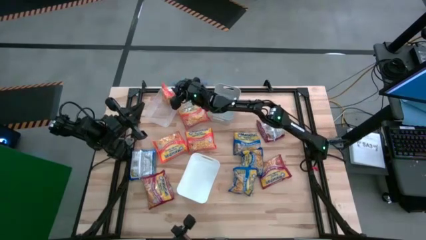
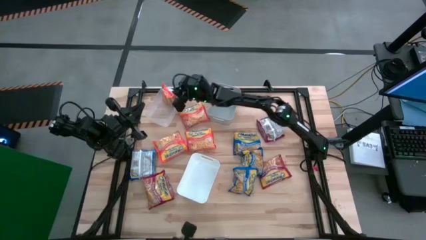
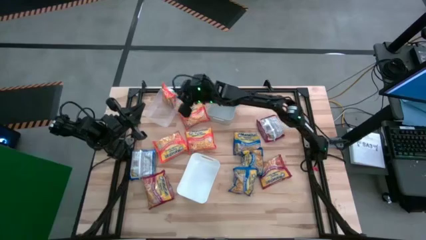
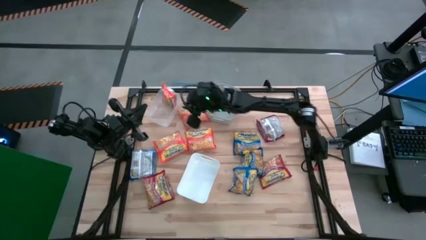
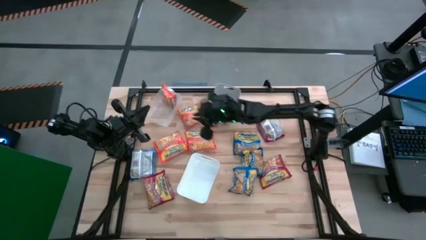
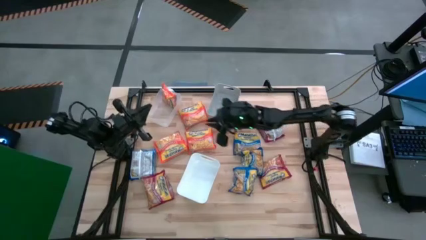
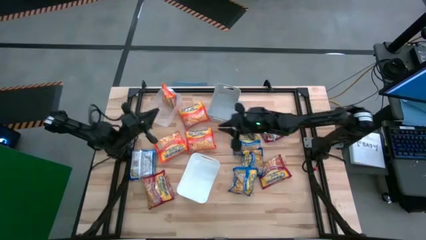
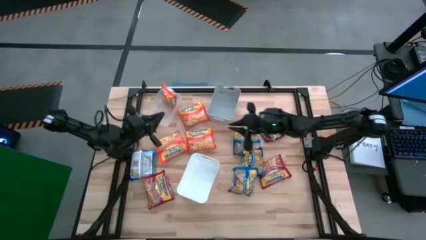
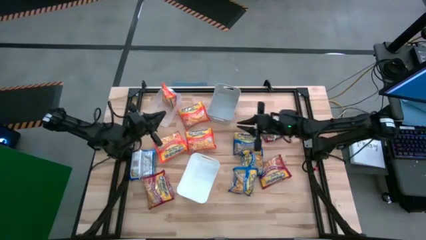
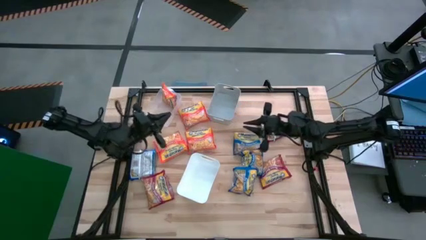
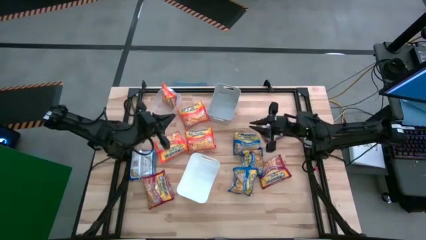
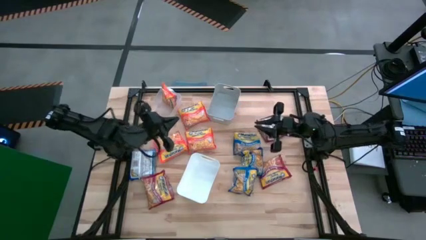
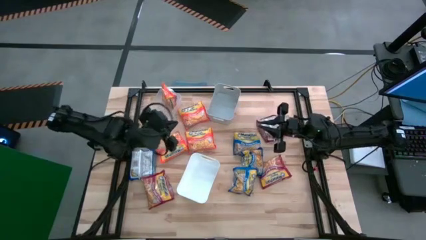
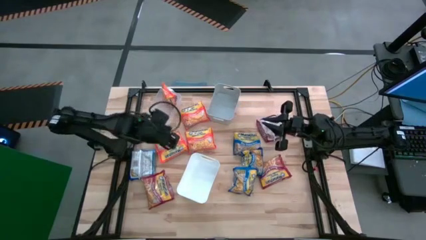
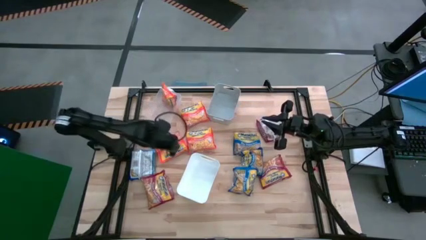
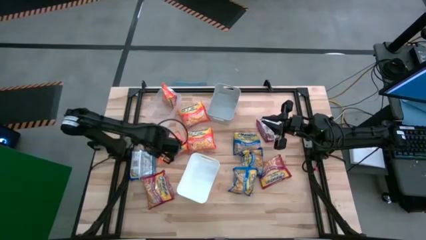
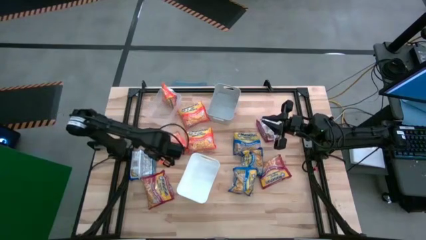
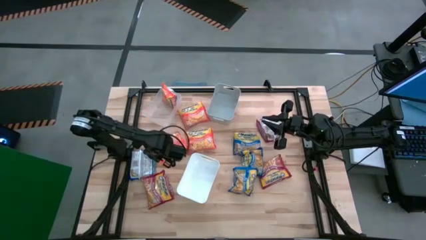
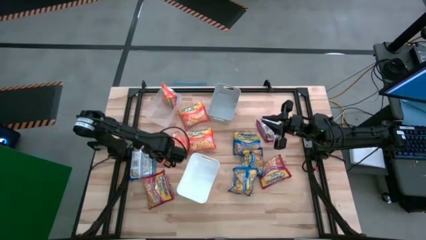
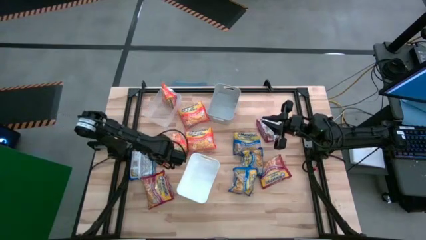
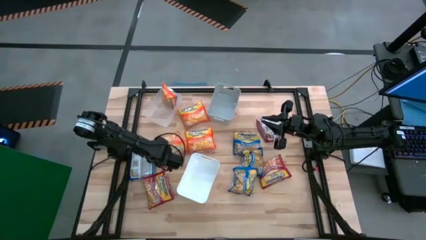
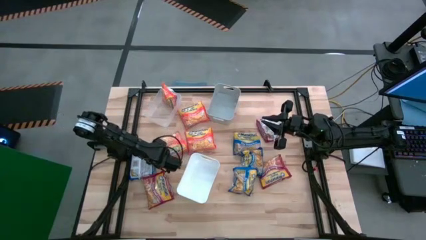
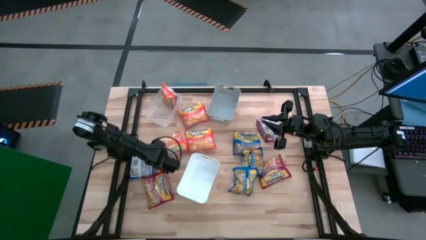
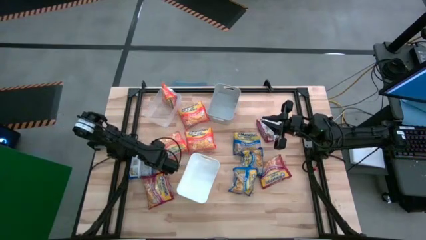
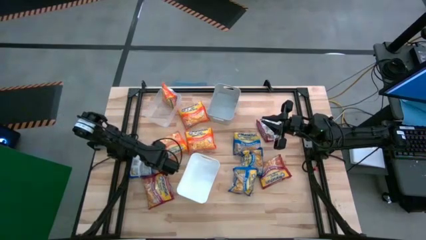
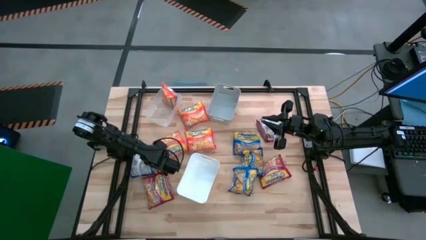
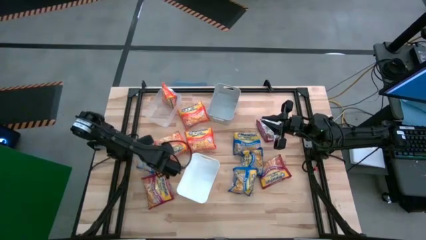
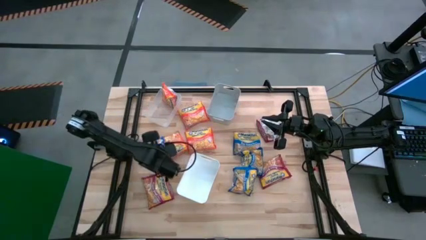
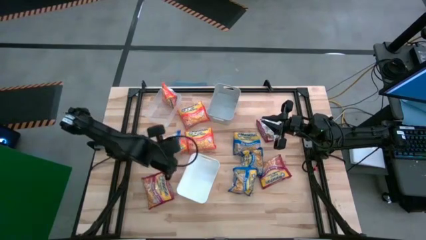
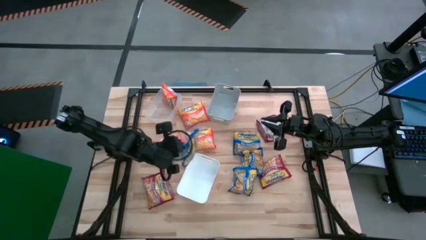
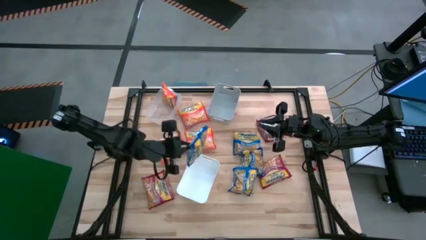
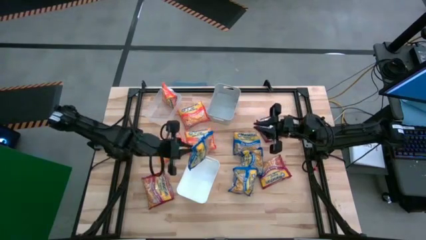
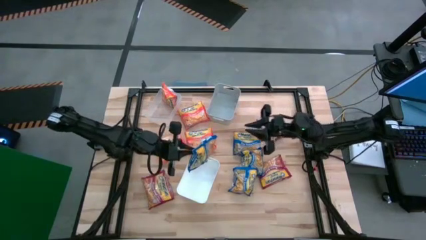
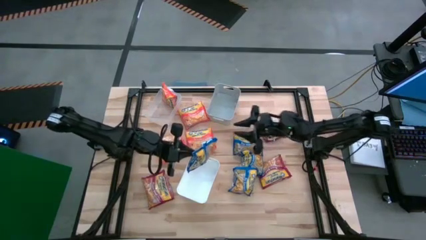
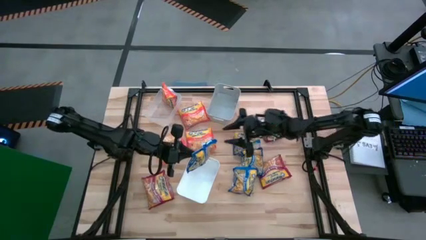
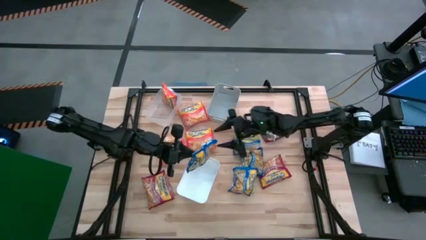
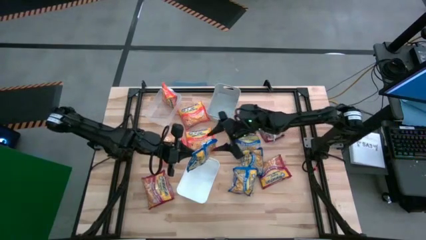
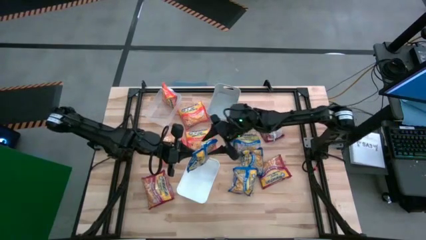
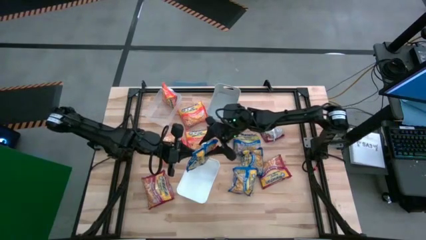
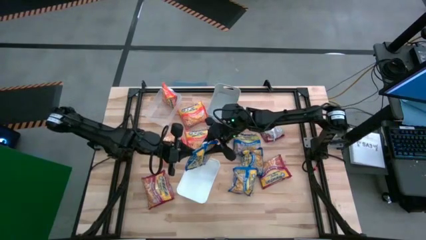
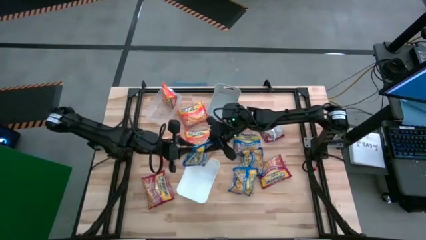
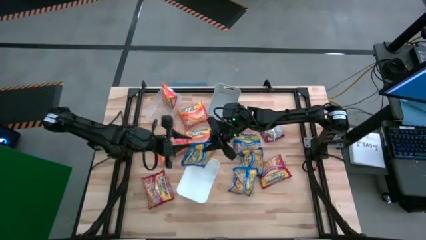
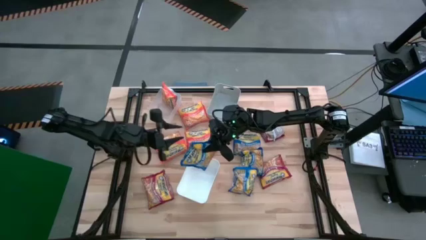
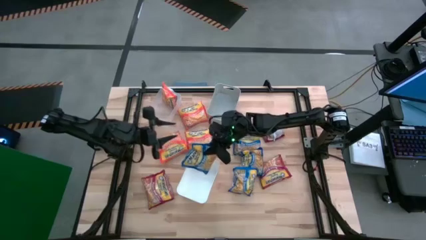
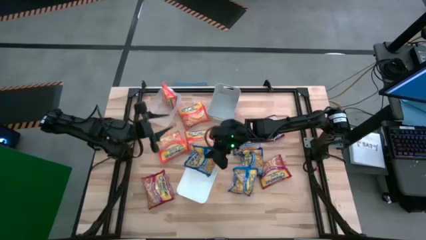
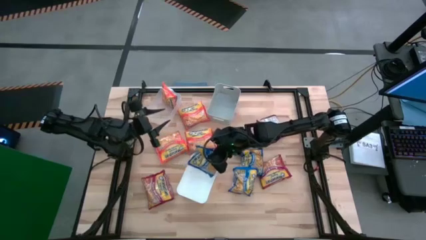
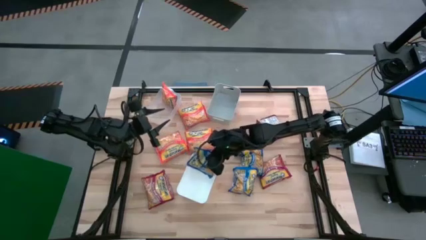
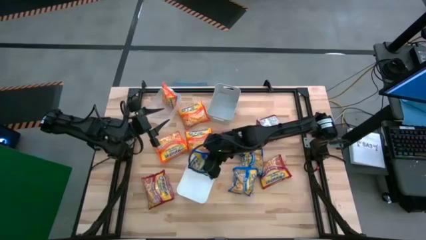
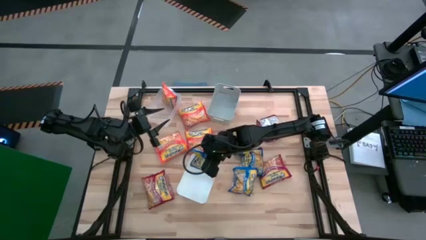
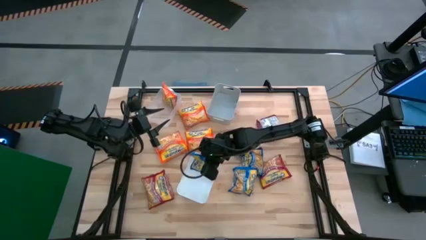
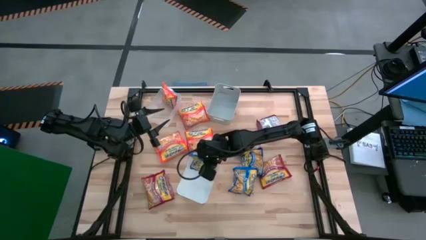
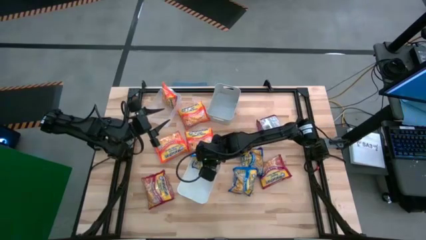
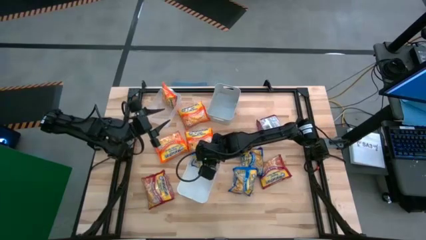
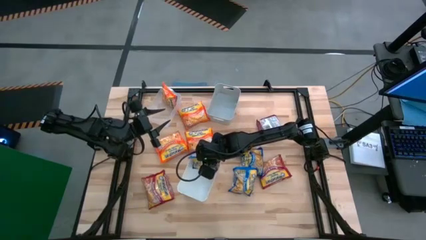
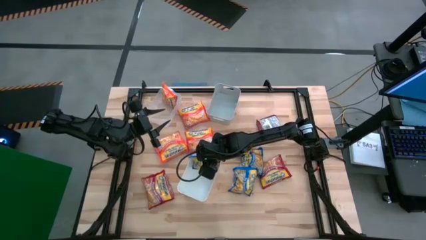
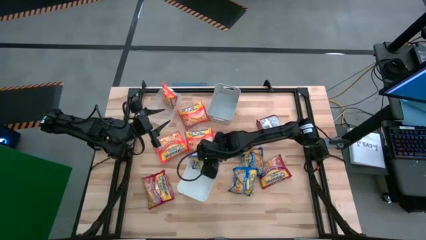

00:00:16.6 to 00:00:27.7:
Task: Sort Maruchan noodles
Put the blue noodle pack into the white bin

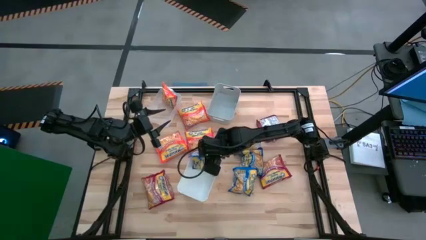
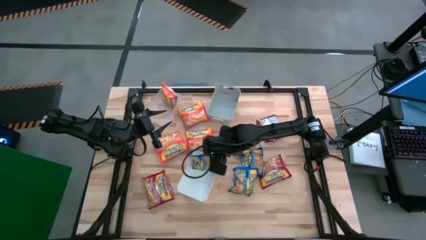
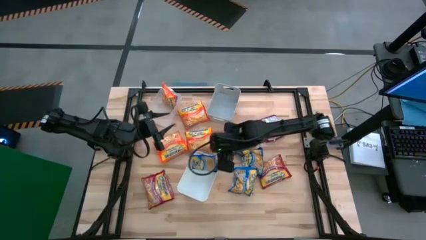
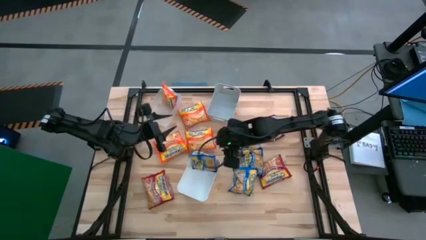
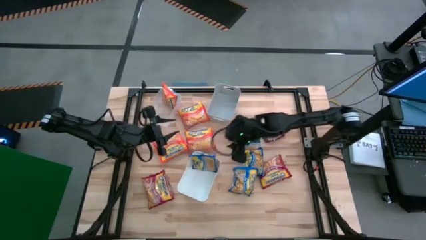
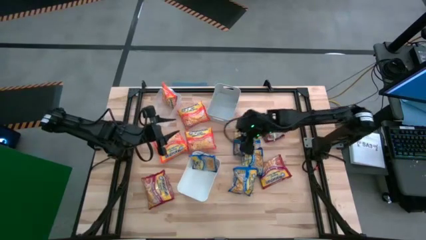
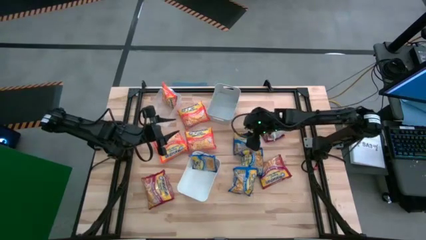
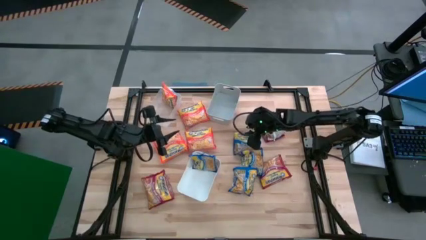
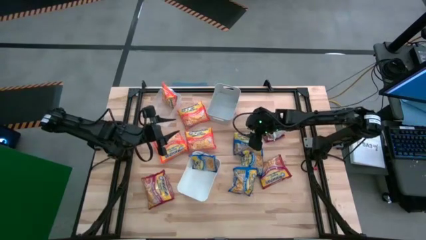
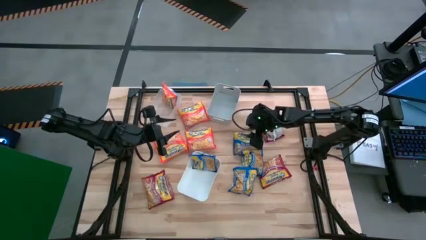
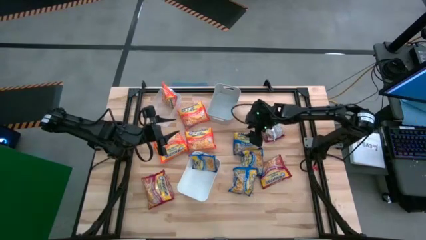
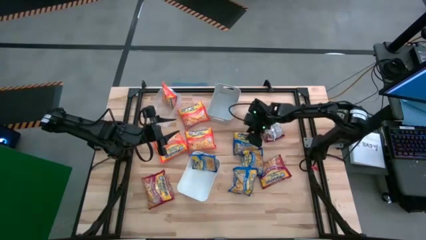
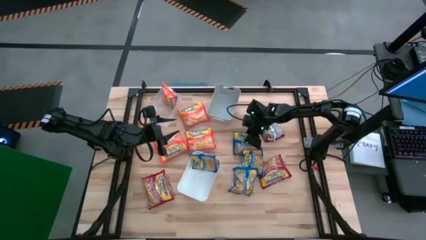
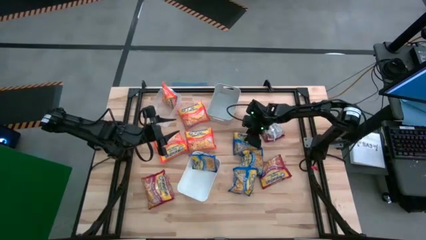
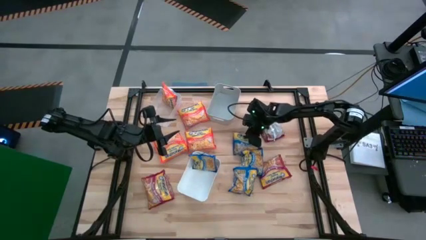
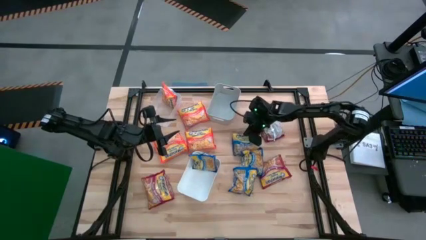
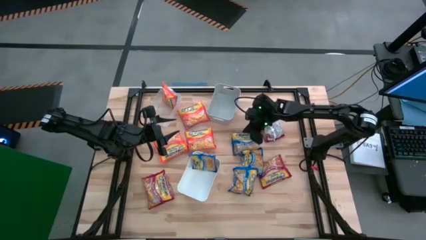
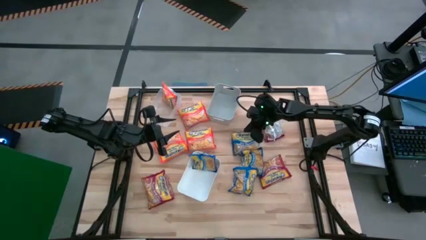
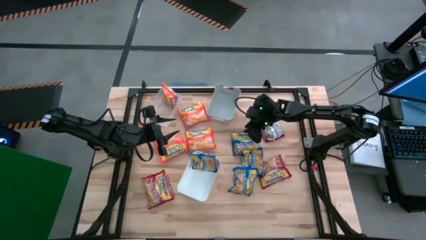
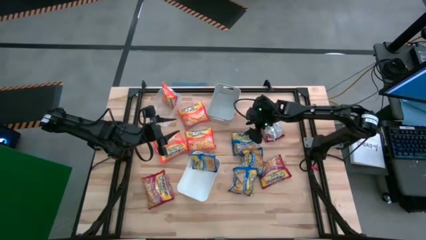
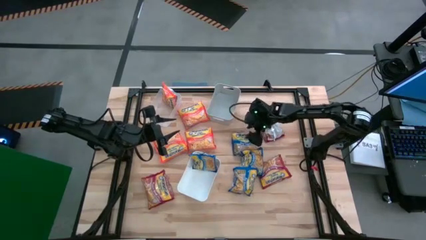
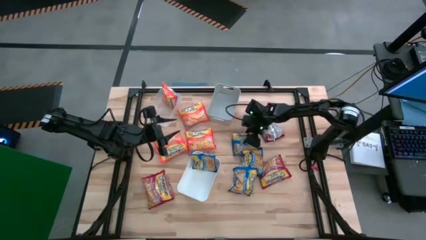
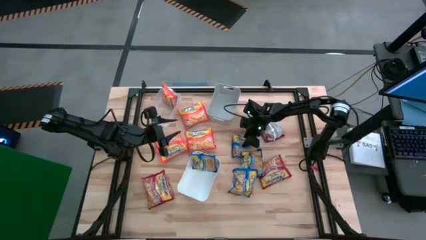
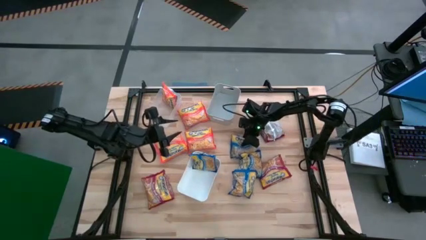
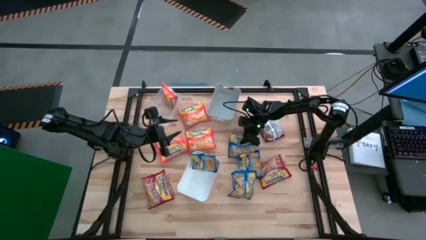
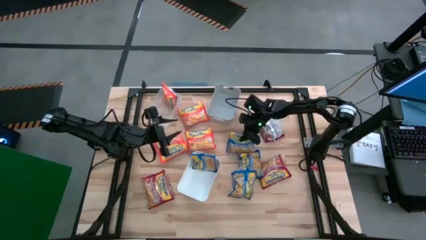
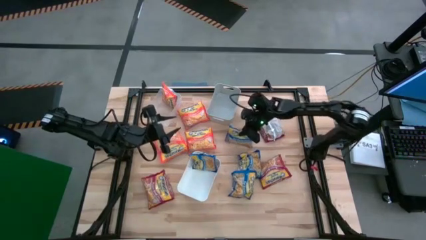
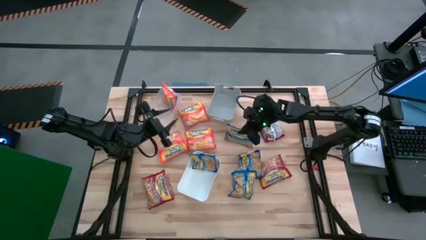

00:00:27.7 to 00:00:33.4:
Put the blue noodle pack into the white bin
